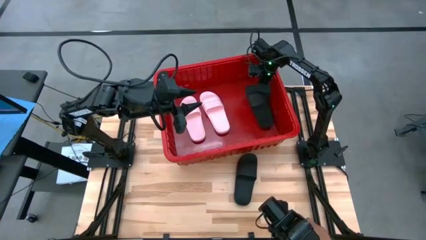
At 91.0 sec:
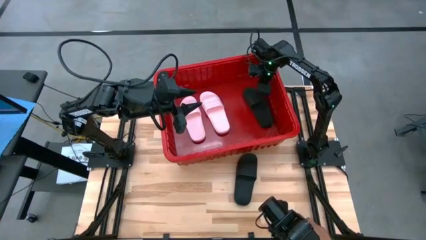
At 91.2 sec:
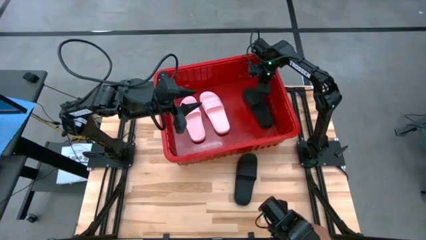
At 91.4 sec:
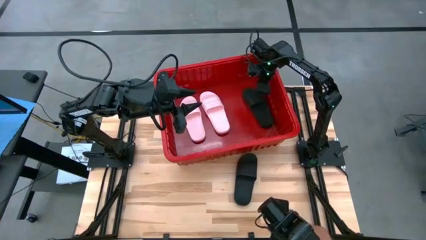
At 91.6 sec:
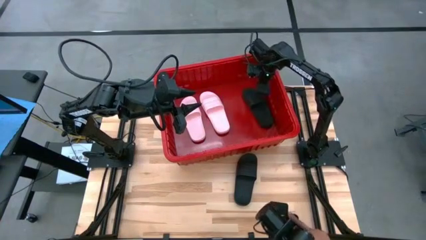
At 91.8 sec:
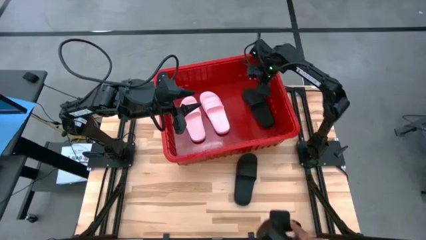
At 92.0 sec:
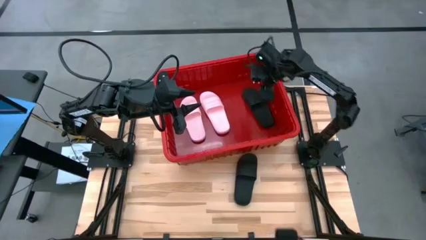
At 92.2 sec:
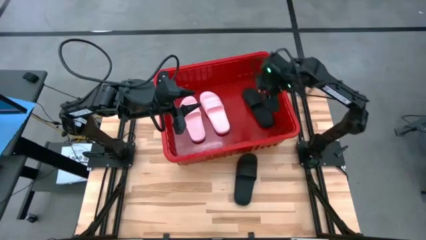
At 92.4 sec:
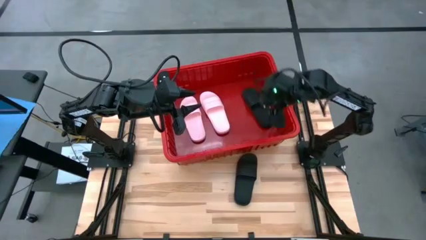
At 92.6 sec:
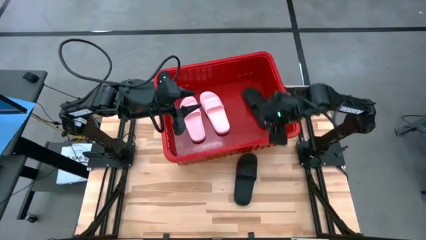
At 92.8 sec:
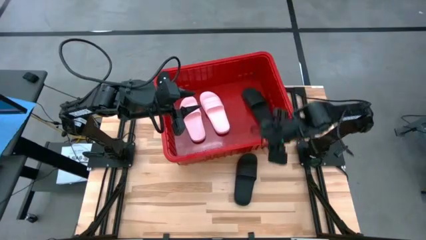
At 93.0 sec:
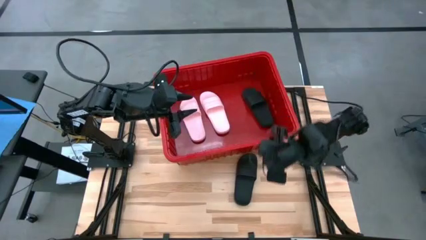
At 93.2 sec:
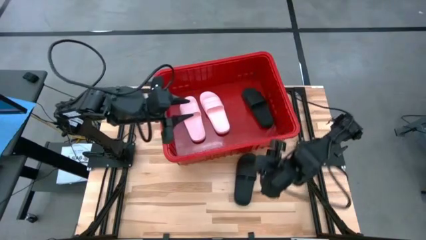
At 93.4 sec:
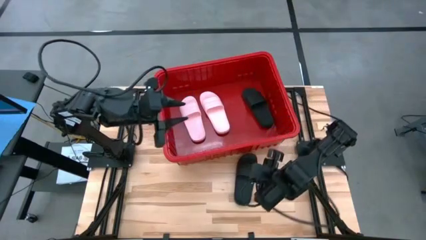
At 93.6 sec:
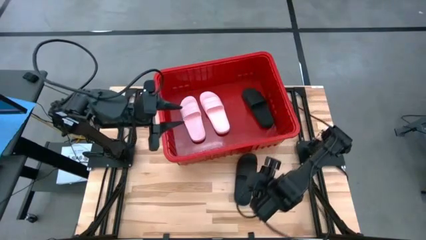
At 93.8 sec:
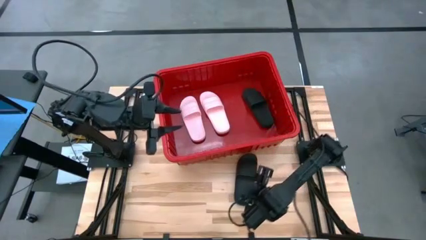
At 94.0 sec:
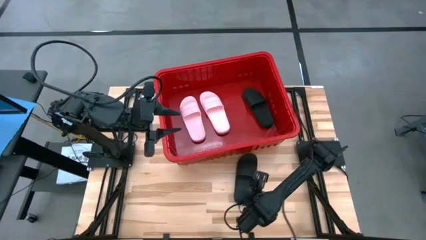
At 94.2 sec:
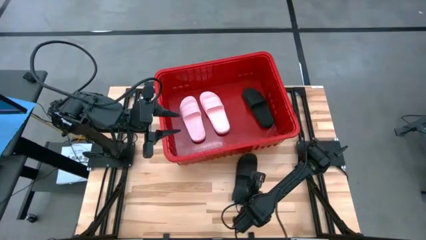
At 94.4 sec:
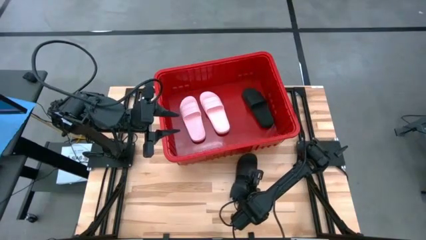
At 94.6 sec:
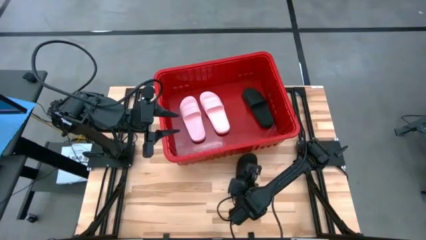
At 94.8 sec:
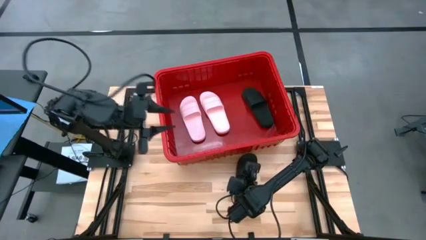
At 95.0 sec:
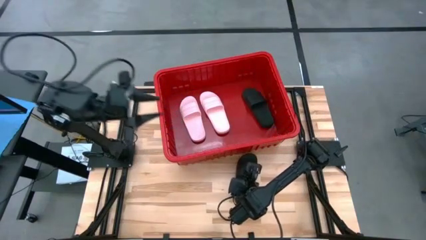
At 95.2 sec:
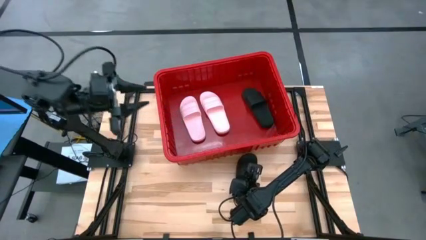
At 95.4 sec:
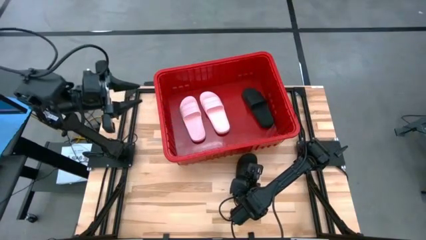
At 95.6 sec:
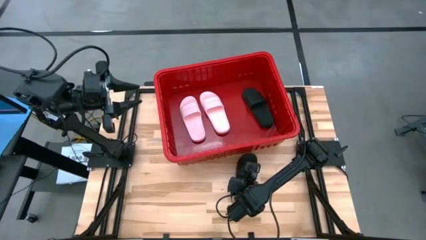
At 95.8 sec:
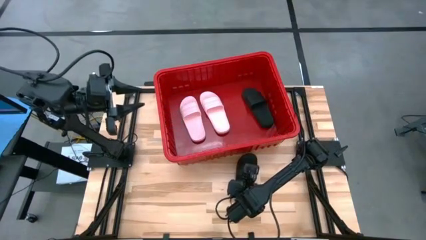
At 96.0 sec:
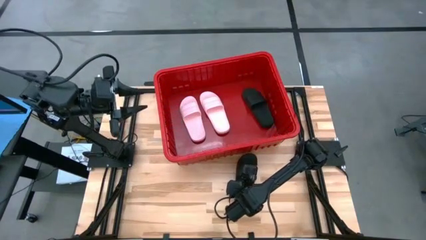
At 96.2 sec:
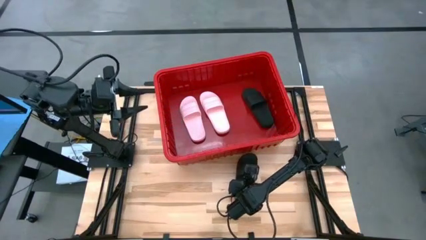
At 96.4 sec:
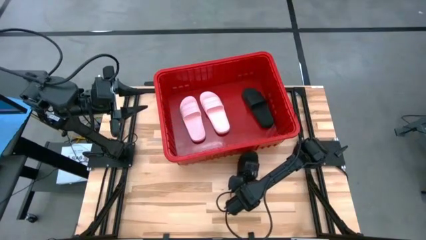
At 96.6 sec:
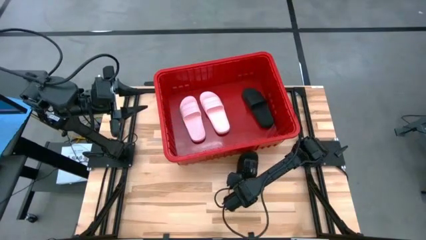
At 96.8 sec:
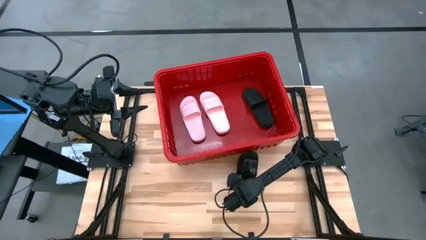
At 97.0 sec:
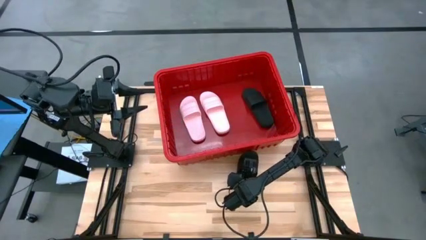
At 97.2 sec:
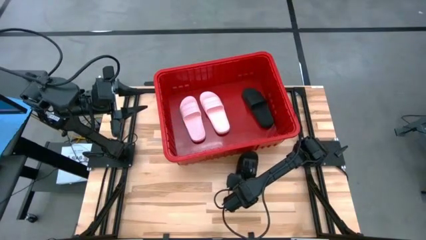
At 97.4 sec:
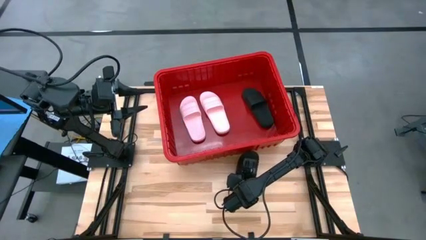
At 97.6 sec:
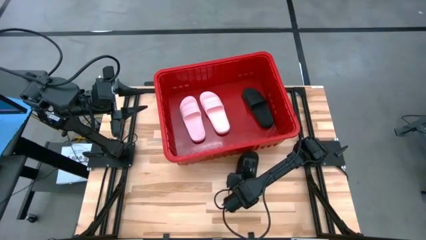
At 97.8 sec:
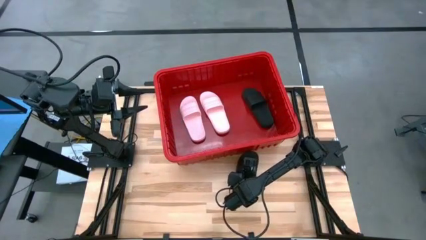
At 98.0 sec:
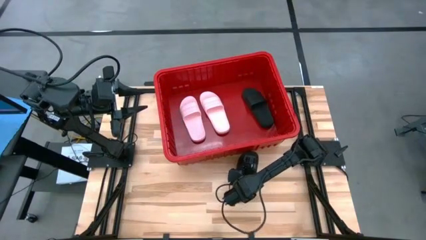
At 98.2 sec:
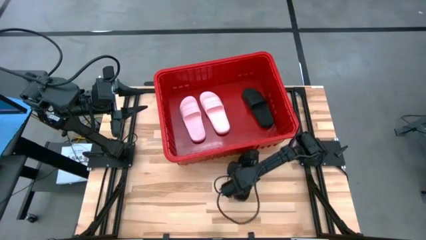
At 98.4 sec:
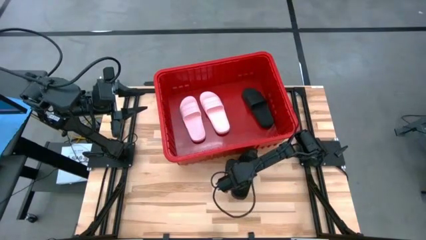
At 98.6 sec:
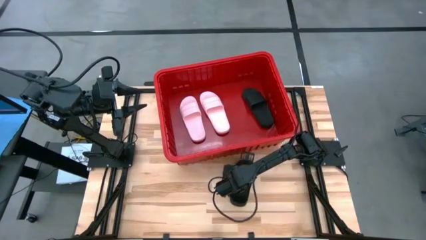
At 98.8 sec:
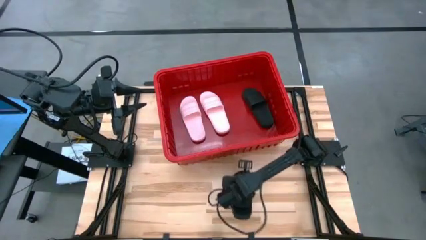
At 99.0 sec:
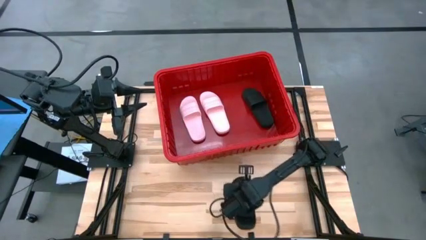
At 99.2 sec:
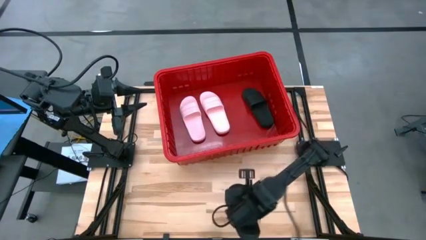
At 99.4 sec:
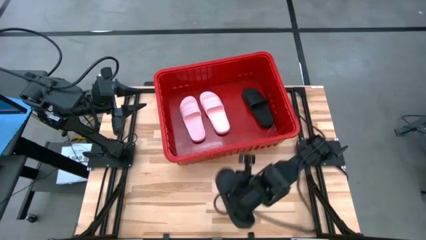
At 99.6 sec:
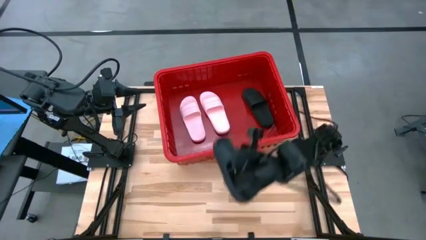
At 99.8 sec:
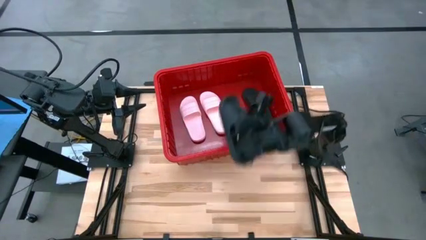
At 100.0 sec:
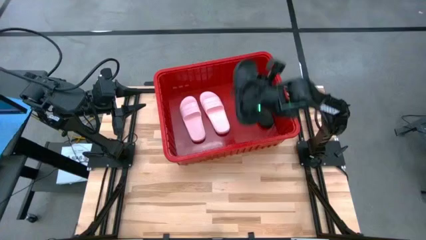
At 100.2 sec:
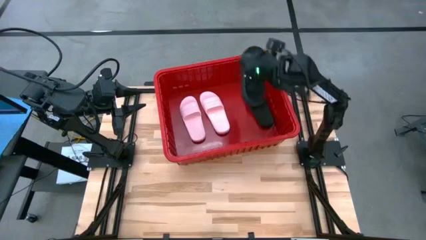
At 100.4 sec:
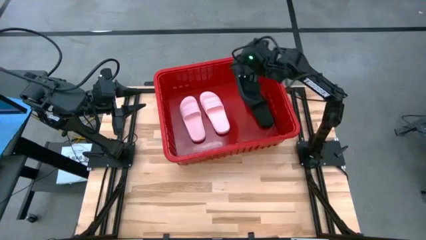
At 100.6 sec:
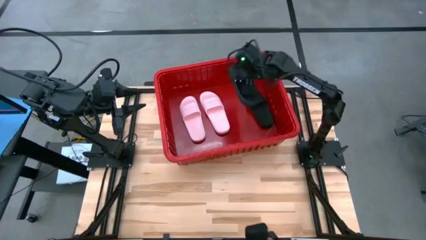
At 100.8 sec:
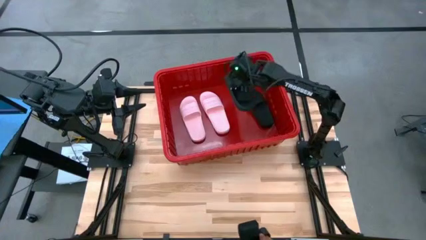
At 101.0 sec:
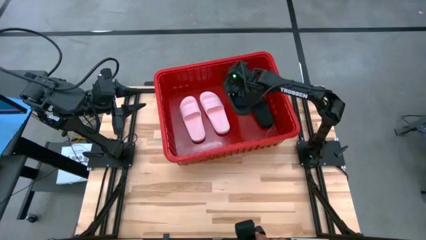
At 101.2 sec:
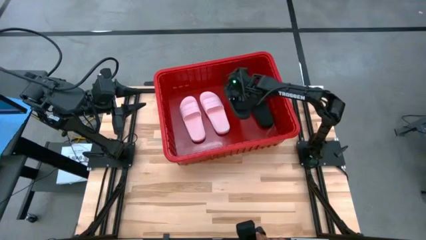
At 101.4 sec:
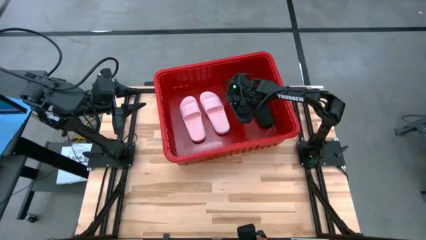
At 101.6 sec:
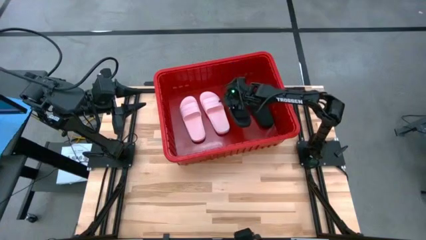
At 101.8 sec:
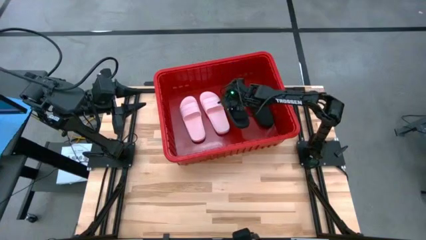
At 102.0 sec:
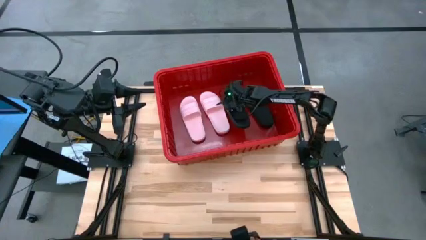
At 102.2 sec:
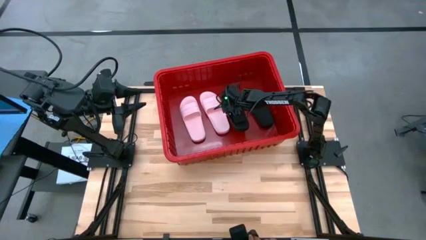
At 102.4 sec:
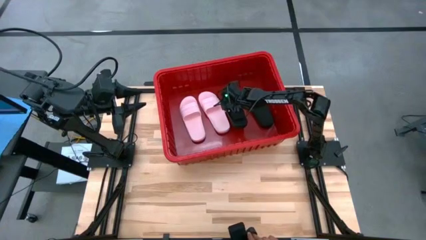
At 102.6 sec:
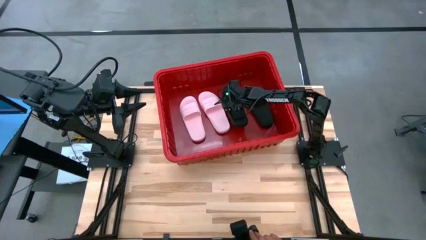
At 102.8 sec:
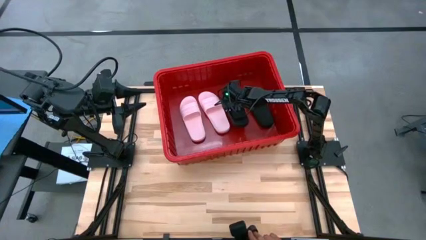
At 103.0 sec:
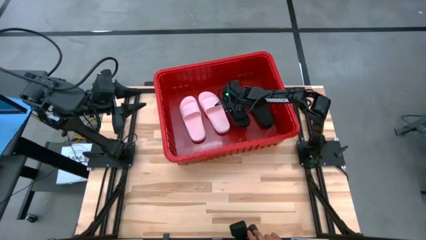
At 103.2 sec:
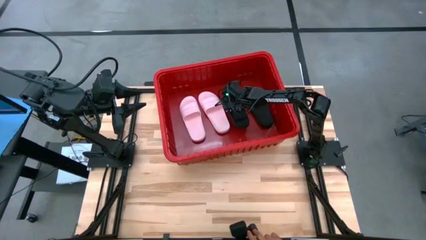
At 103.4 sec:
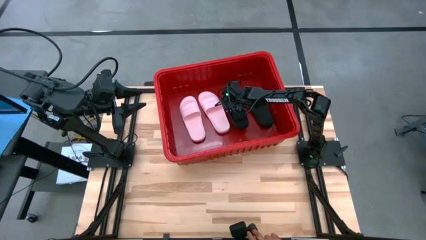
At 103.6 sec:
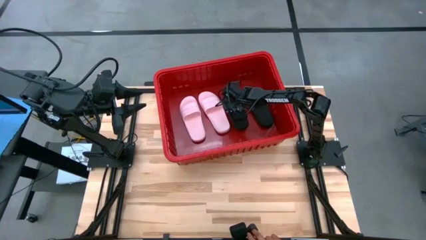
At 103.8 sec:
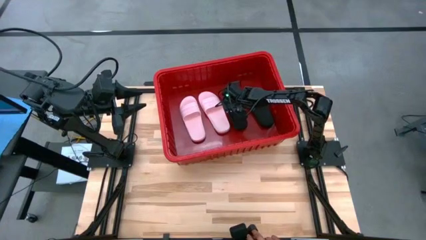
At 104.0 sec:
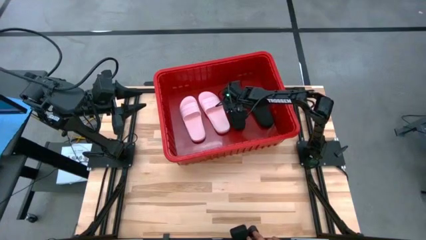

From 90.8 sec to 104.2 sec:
Task: Pick and place slides into bin
Put the black slipper in the red bin

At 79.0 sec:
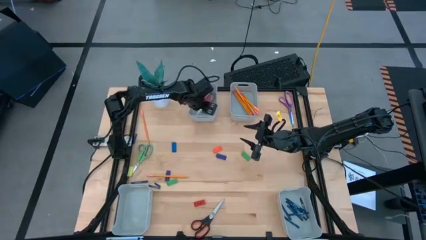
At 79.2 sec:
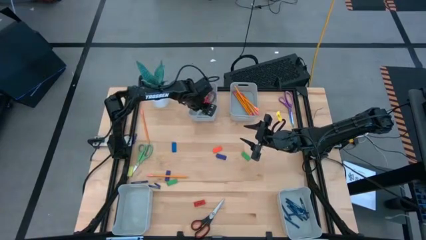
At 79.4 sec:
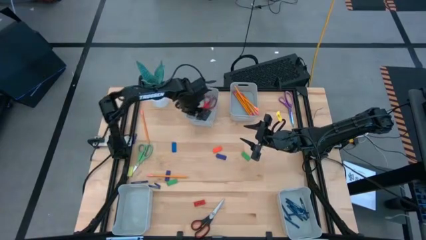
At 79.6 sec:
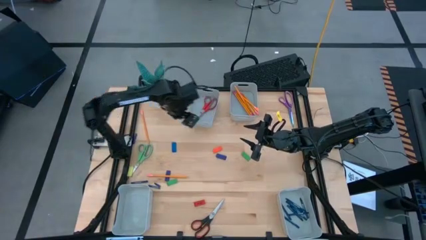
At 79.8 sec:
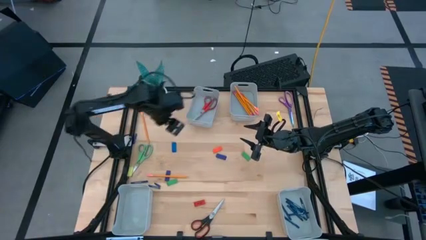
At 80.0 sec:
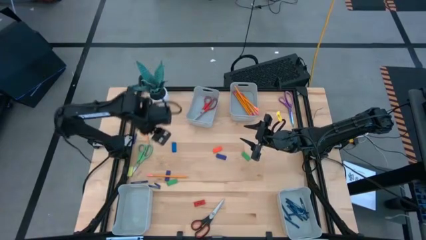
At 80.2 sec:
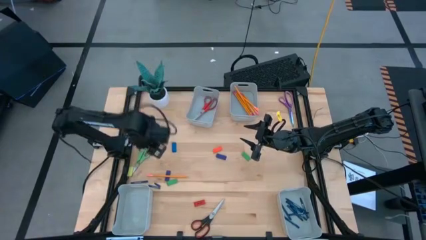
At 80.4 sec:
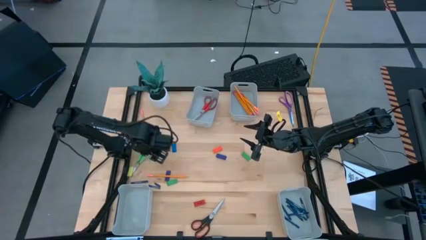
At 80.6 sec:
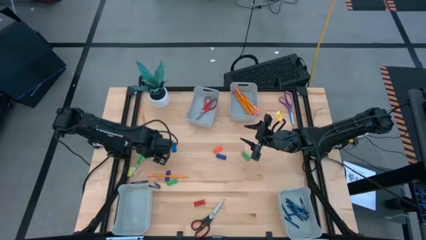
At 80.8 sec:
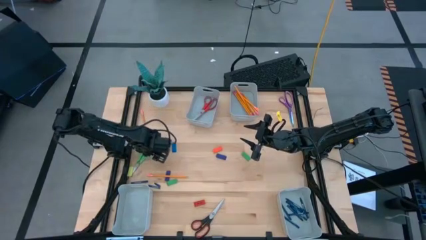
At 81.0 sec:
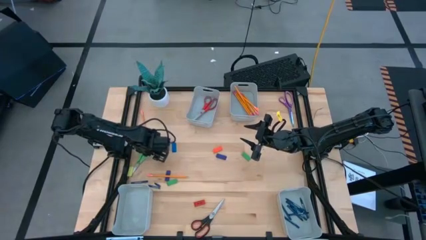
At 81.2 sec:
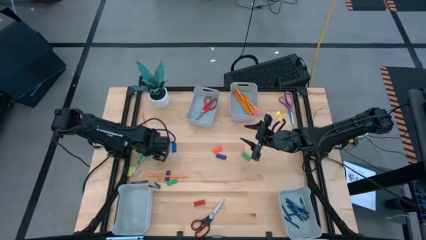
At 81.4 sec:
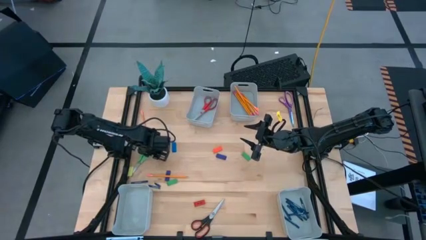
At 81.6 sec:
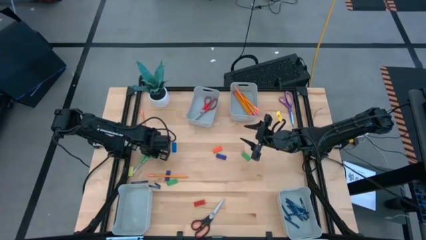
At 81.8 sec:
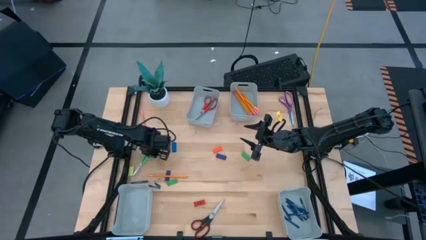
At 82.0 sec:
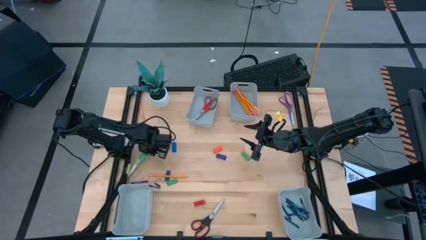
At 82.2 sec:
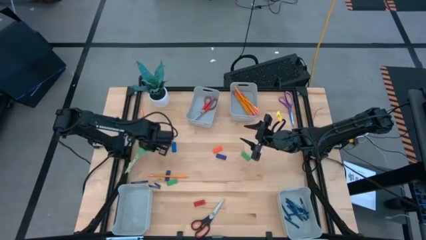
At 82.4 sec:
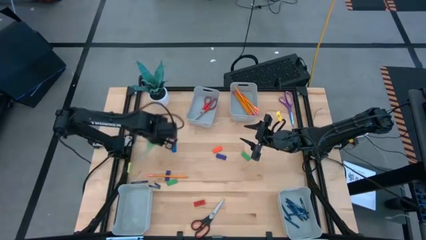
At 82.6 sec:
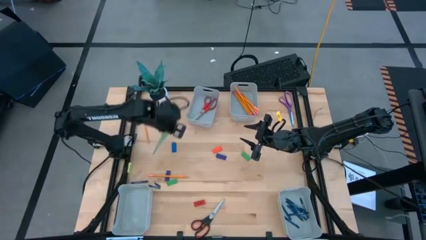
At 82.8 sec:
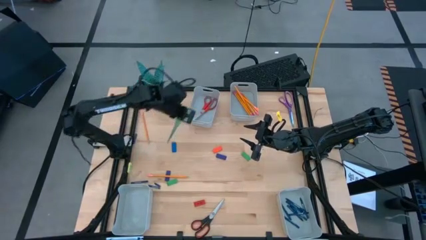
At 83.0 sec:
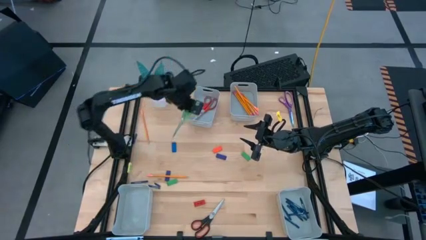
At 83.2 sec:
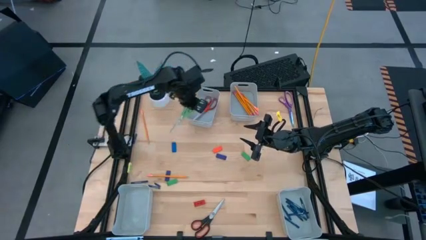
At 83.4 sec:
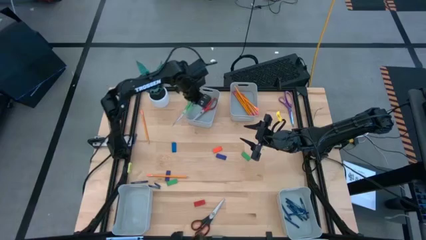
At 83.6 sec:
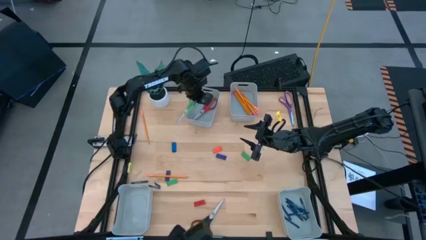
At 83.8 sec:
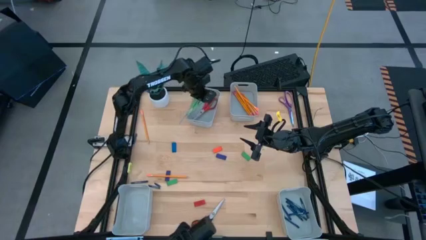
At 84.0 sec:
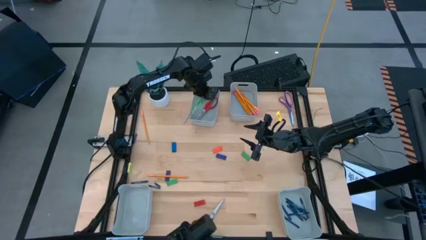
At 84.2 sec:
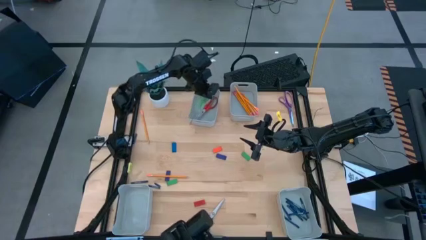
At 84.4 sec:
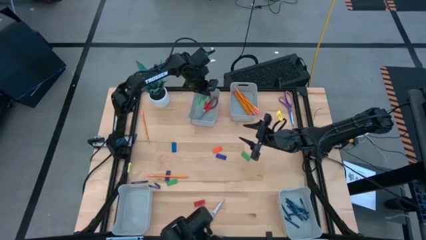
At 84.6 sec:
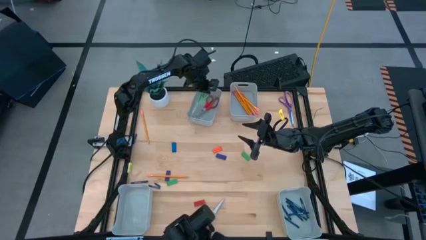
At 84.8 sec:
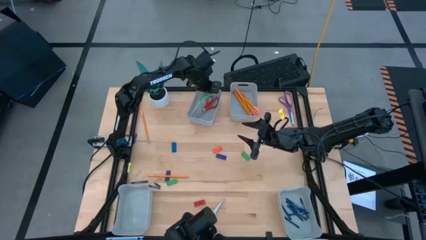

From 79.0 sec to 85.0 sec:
Task: Sort crayons/erasers/pens/pencils in bins
Put the green scissors into the top left bin
